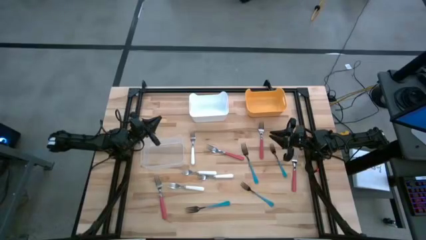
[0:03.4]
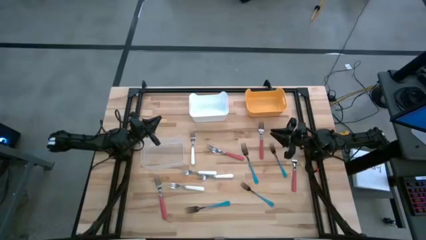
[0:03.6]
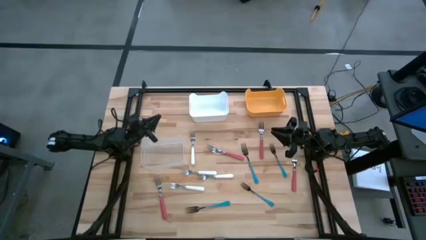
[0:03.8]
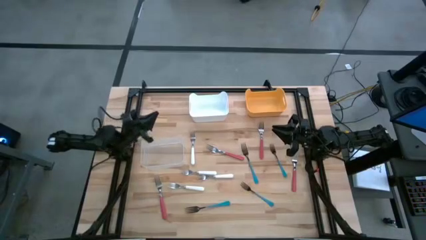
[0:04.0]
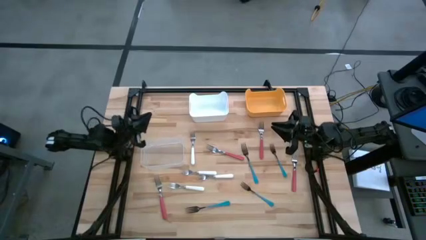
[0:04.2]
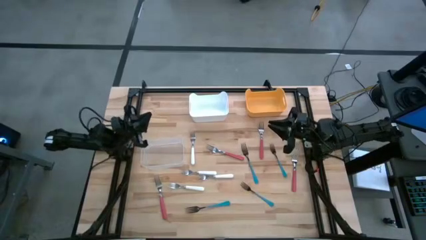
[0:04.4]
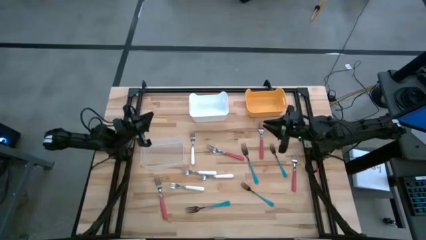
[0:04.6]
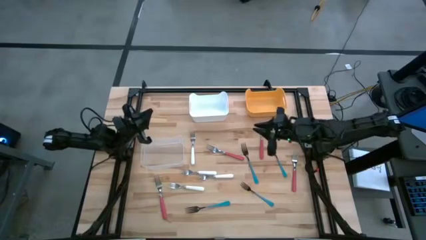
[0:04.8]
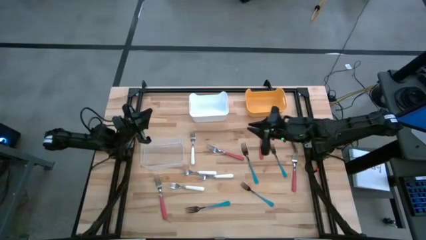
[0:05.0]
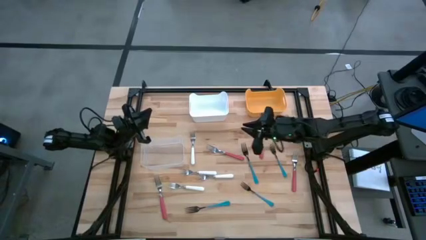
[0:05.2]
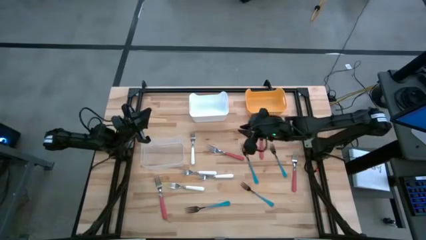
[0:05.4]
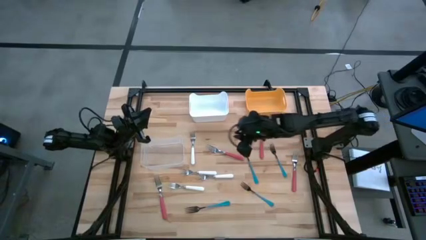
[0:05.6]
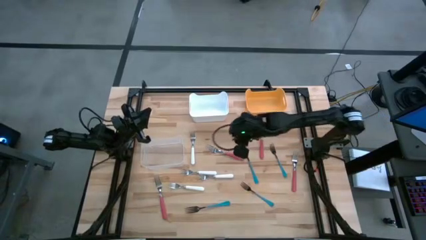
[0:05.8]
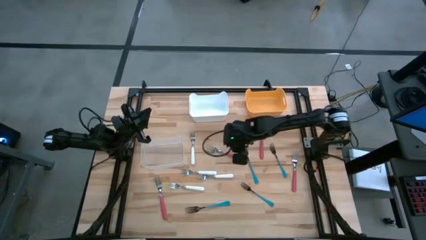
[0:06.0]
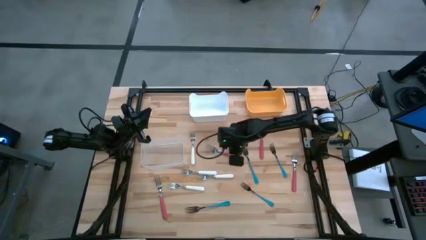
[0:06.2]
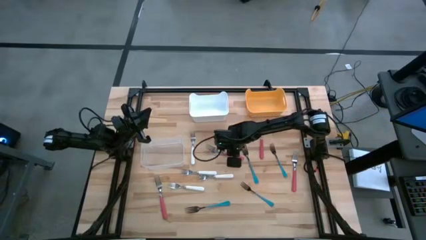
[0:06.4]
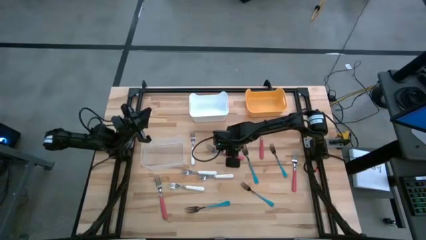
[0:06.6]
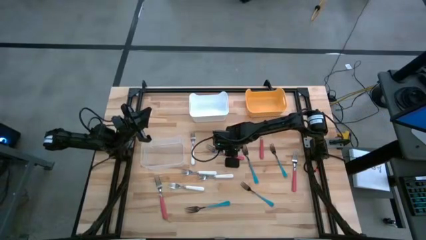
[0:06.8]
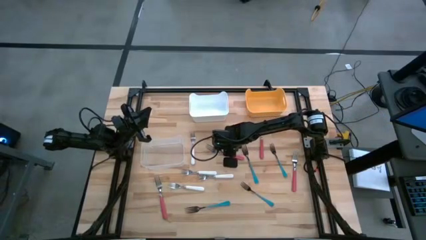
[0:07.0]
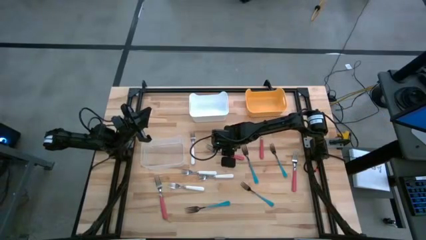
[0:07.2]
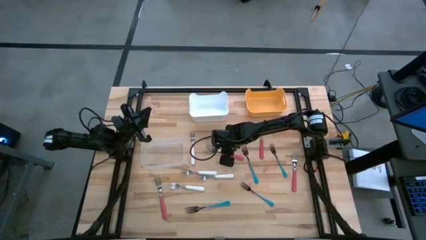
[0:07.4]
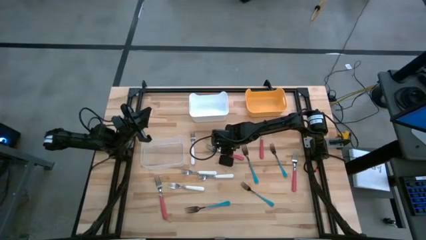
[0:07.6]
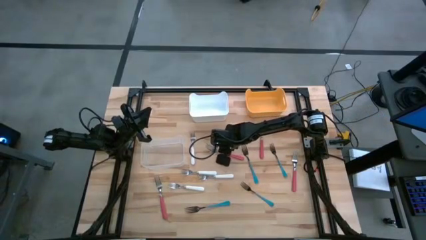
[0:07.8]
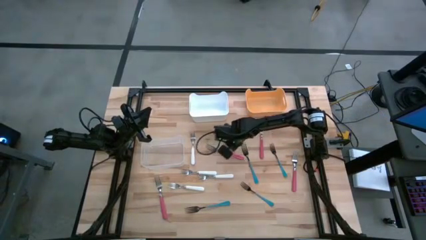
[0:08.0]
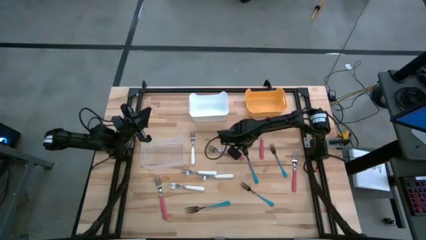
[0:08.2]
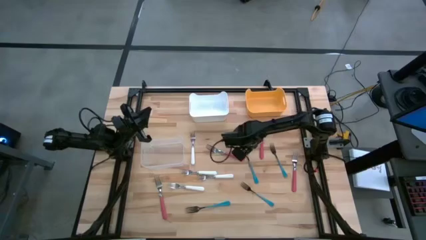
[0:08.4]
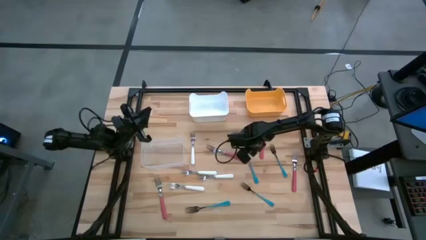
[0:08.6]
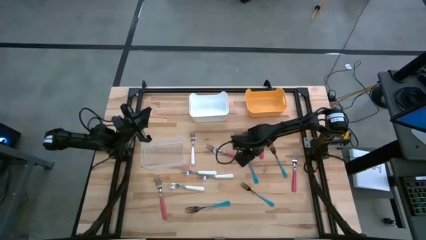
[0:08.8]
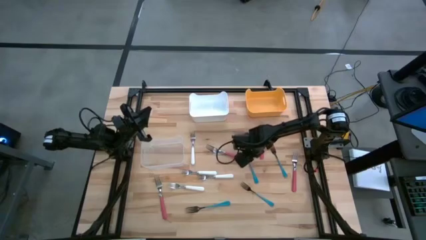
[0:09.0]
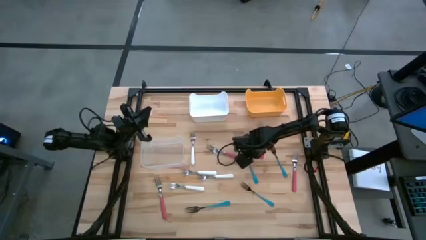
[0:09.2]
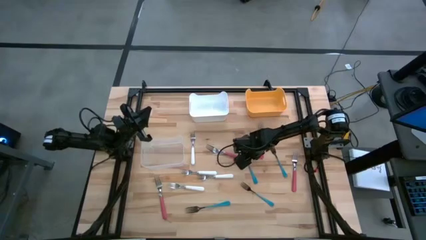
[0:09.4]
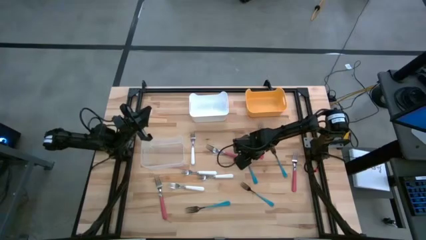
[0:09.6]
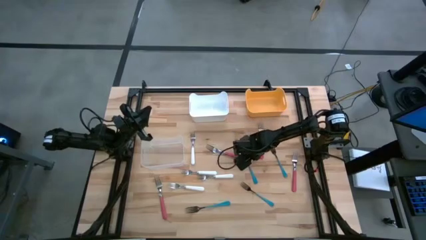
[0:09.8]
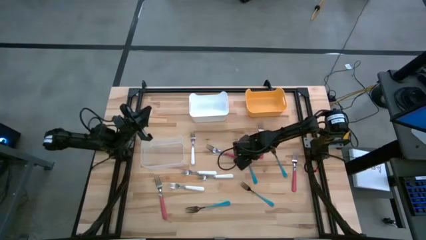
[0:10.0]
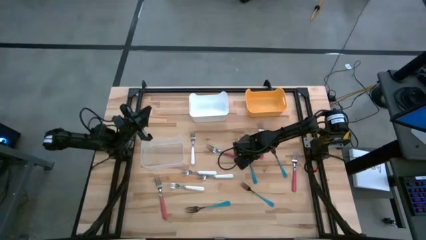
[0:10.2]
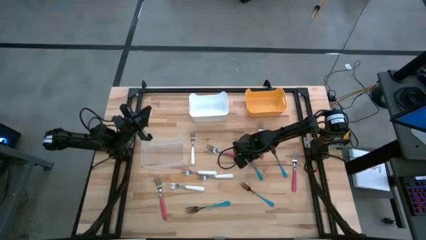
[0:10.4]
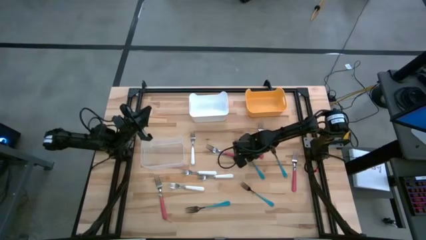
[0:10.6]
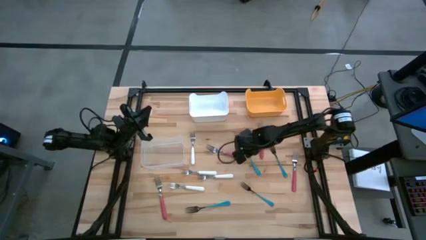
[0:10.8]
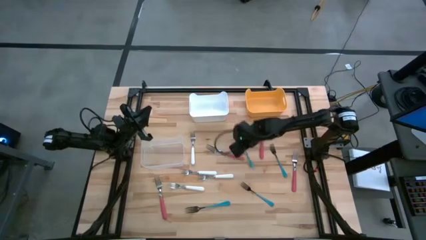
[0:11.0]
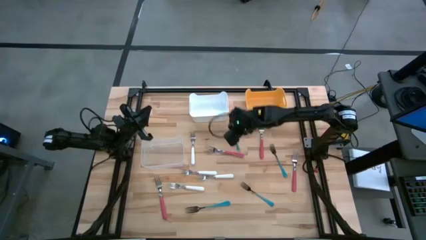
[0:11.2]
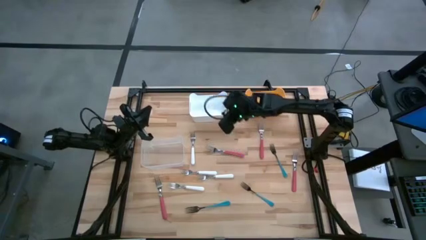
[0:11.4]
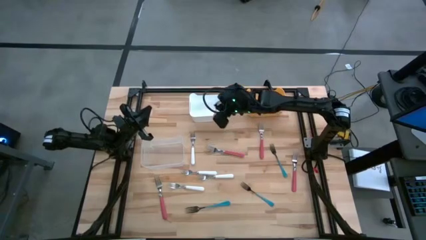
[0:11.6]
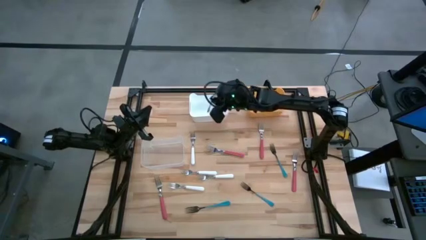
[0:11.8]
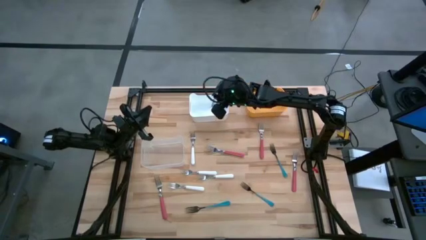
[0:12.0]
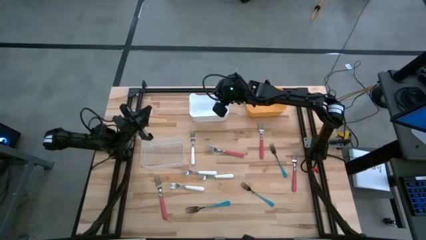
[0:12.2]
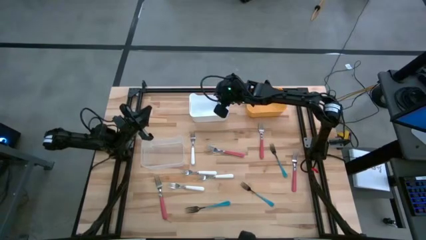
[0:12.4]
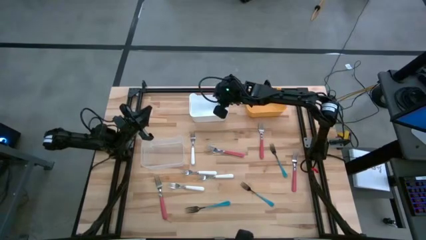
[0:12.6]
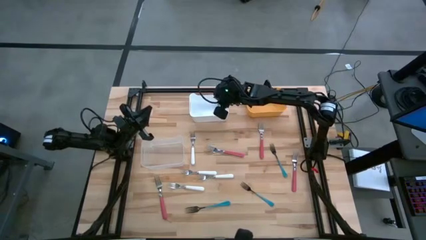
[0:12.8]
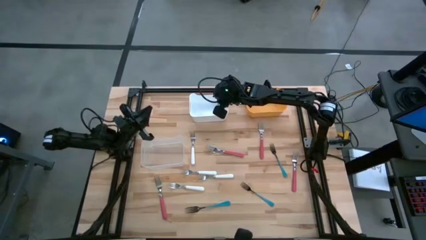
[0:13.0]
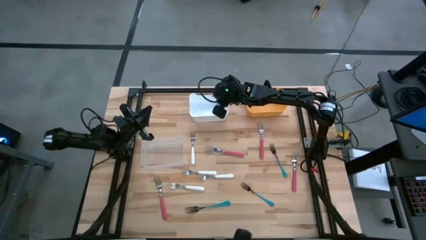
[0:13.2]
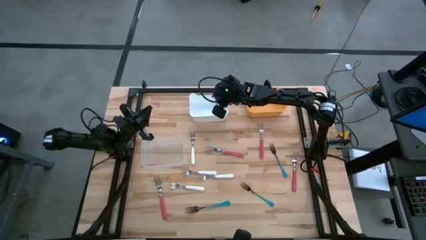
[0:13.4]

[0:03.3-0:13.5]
Task: Sort silverware by color (type)
Put the blue fork into the white bin

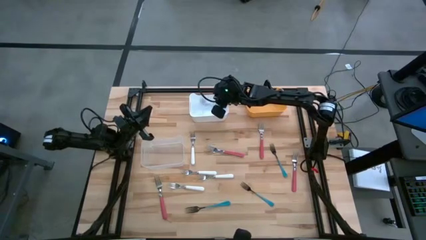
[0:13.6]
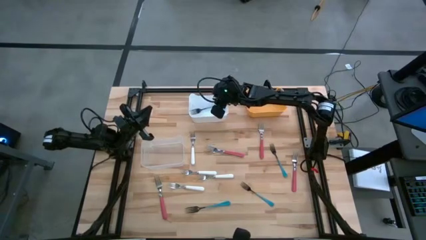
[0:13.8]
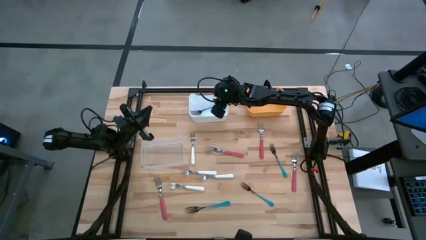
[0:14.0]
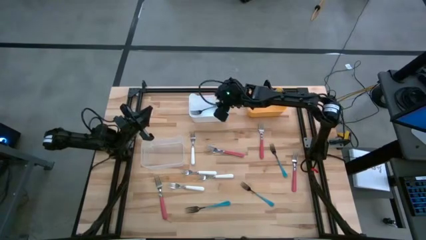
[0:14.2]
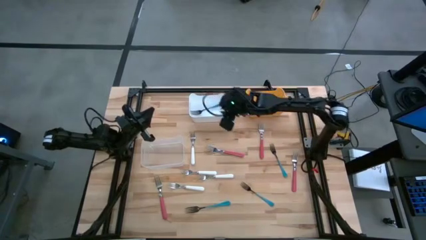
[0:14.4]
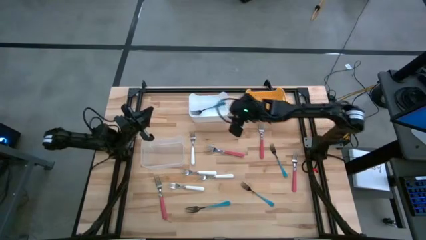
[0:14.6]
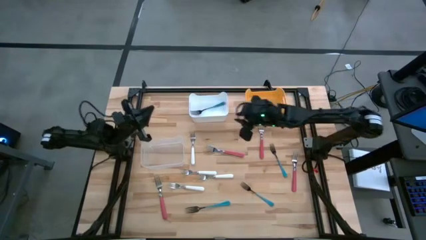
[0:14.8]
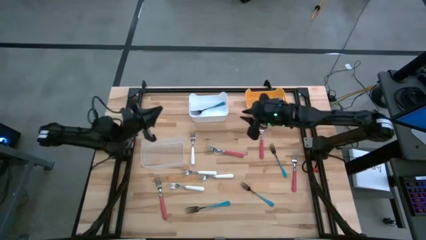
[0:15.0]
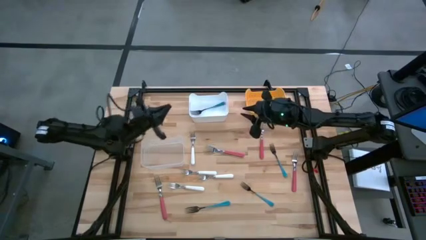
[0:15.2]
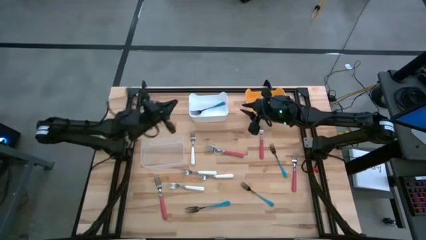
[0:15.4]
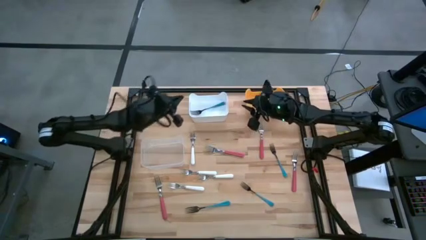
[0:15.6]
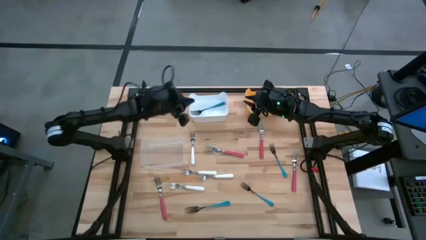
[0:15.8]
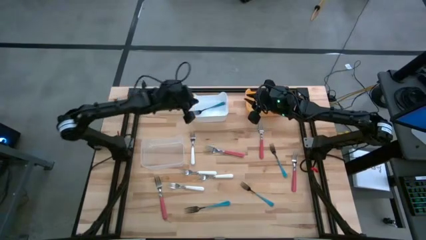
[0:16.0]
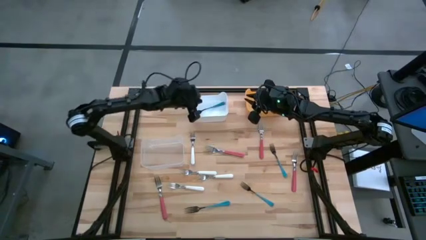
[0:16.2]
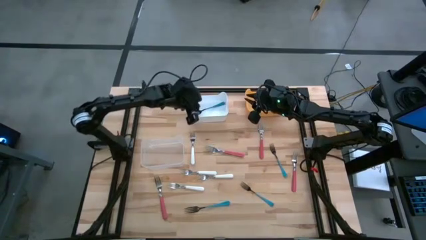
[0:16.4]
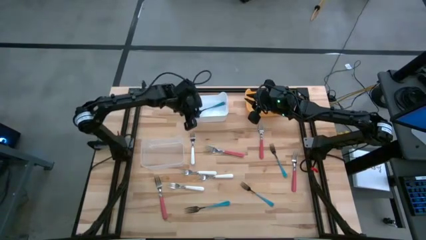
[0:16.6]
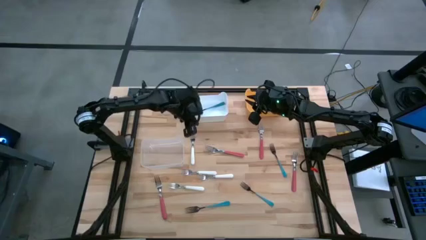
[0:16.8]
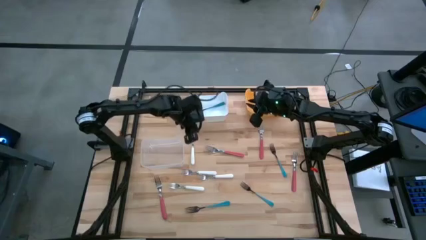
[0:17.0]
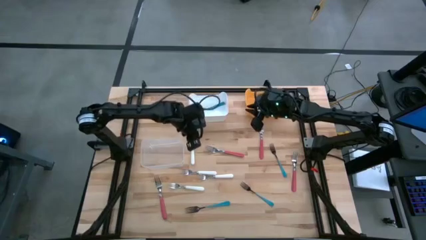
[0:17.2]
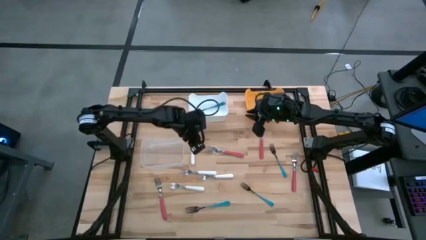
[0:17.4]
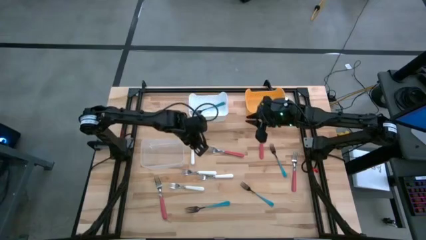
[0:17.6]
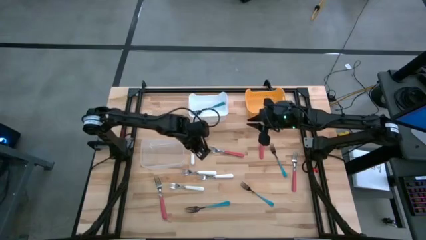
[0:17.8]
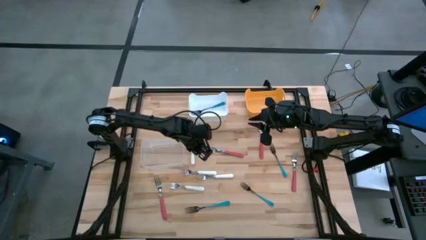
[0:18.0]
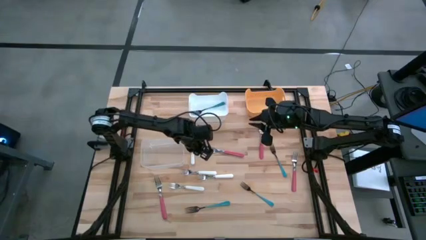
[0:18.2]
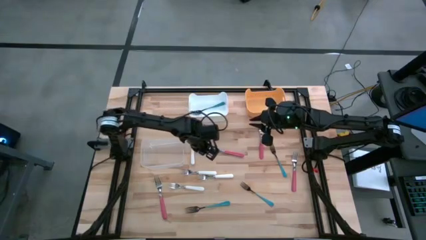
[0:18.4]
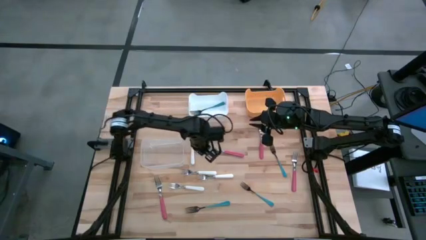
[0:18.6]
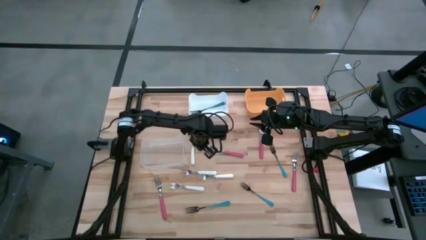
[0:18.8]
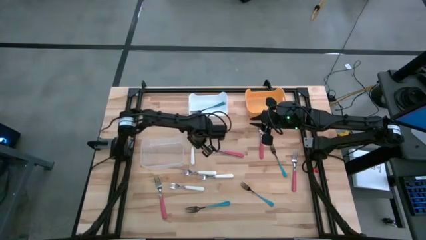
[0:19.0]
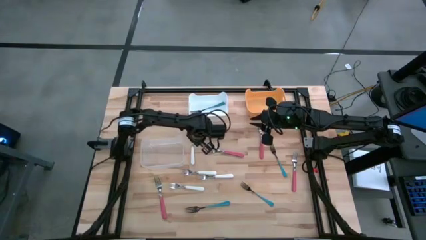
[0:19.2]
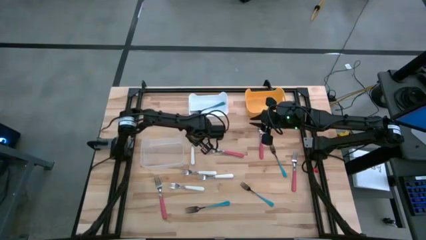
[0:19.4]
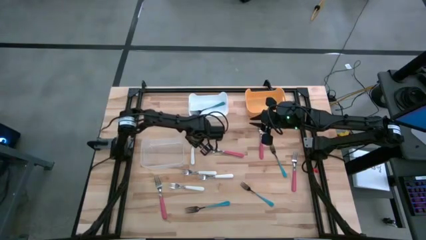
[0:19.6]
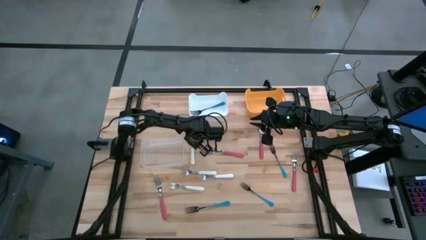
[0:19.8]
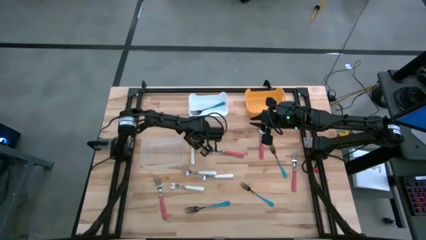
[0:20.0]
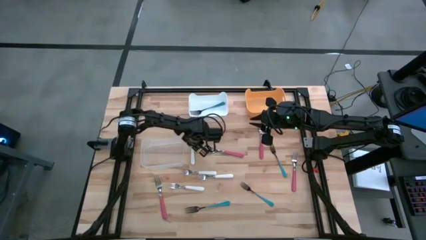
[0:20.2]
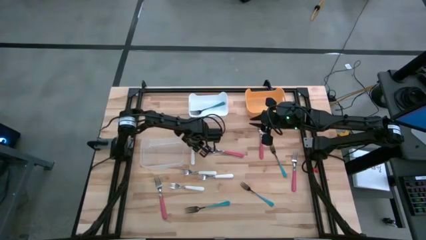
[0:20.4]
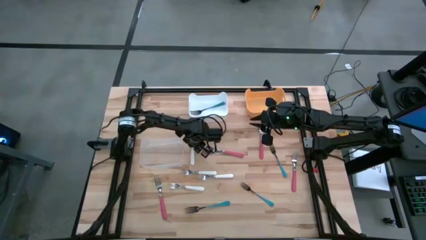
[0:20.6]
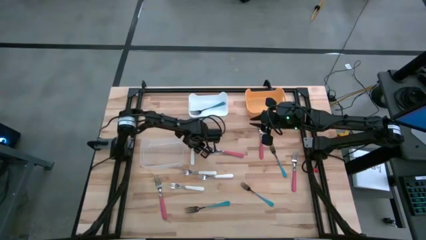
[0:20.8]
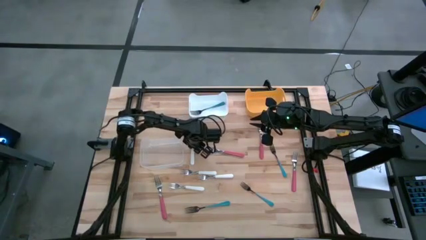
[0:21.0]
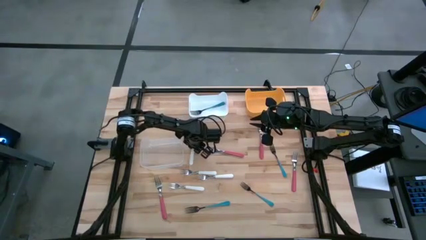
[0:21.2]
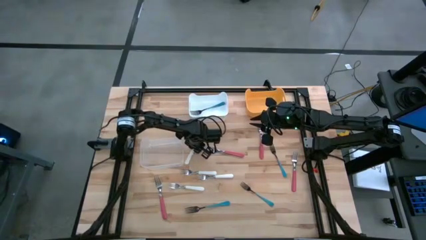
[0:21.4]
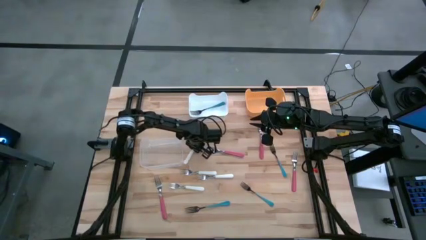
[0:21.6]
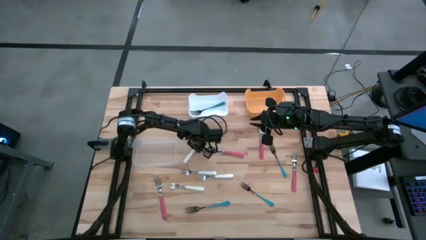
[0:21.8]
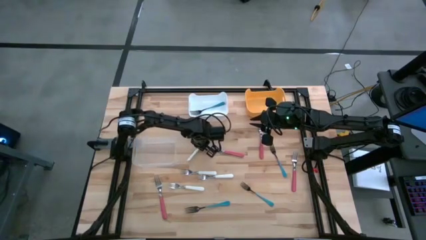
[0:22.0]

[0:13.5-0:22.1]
Put the white fork into the transparent bin
